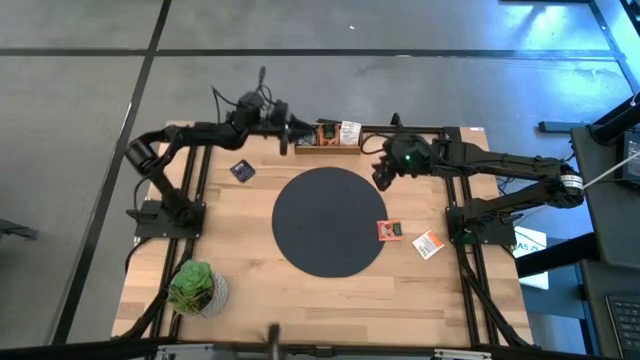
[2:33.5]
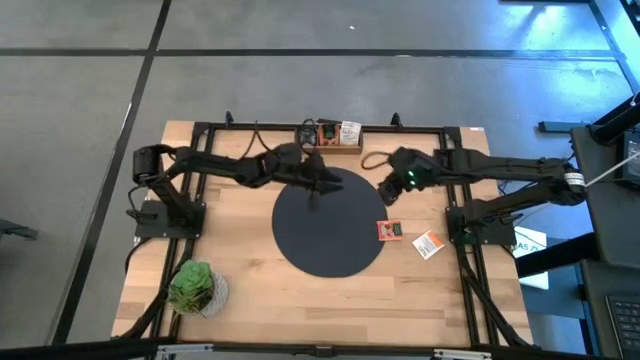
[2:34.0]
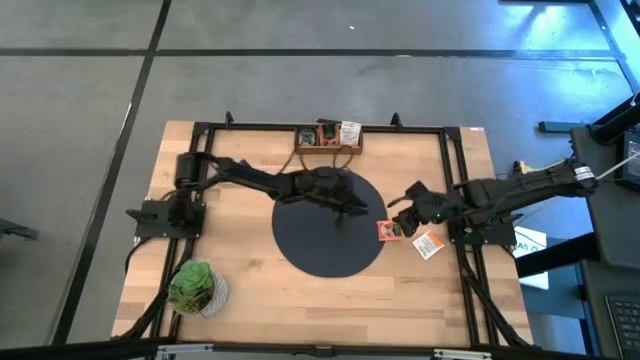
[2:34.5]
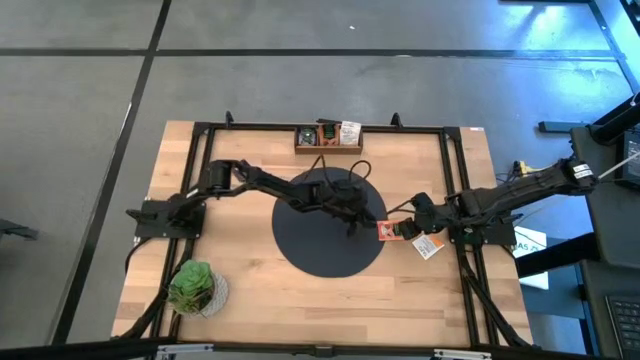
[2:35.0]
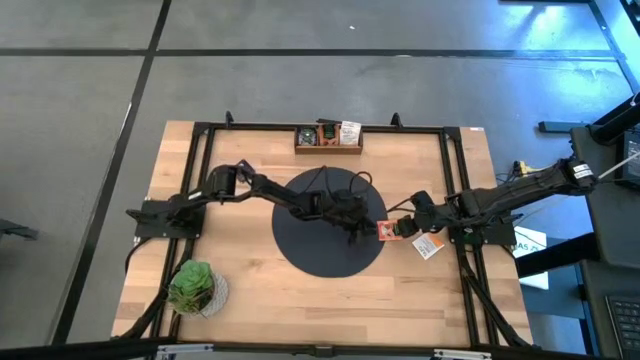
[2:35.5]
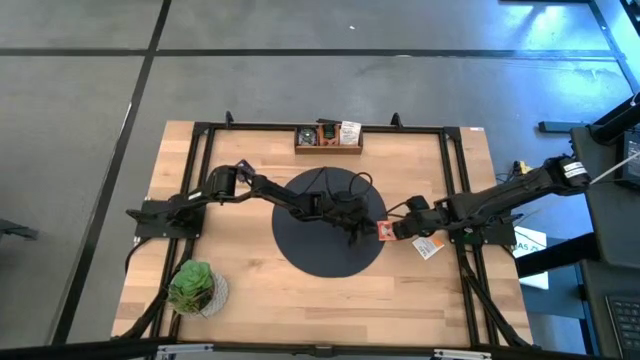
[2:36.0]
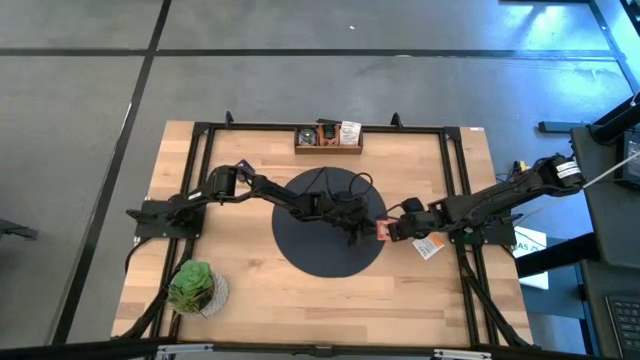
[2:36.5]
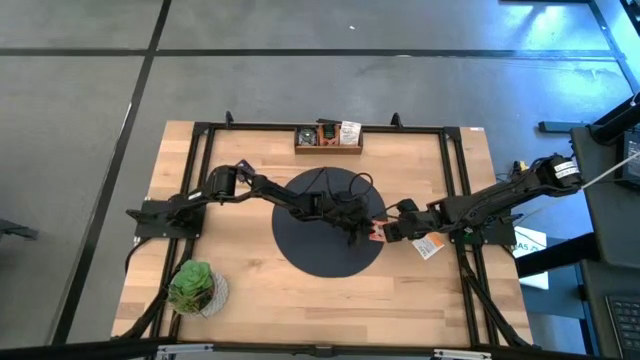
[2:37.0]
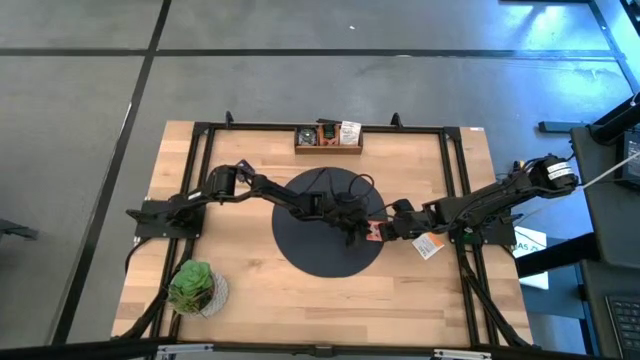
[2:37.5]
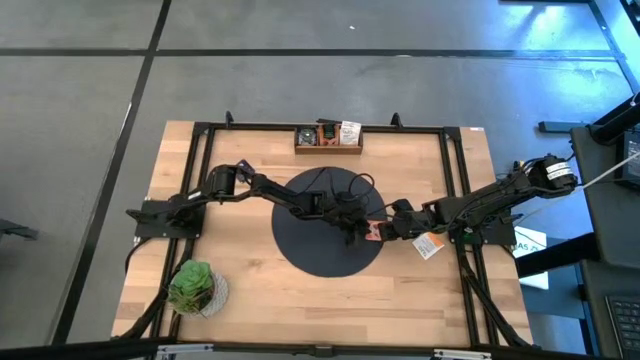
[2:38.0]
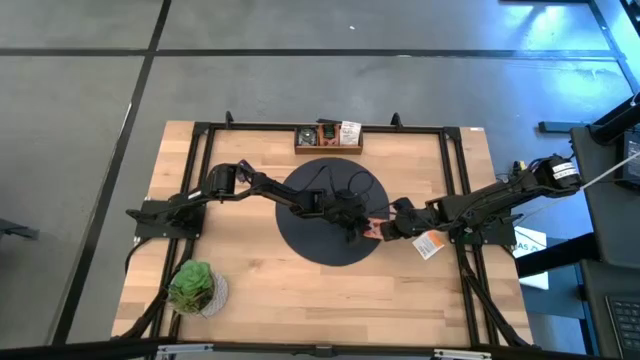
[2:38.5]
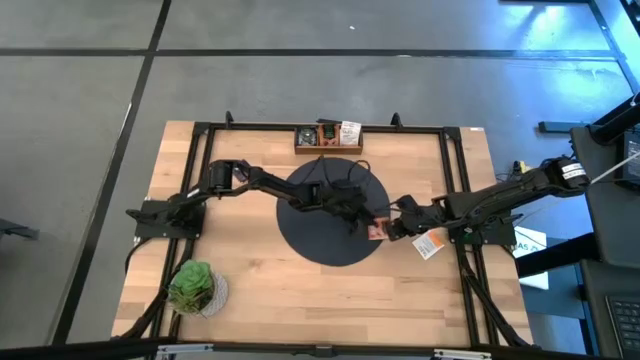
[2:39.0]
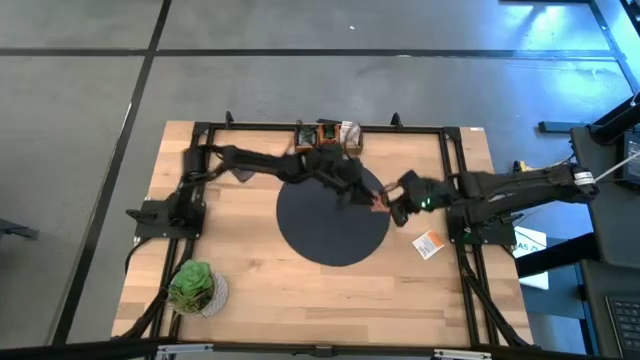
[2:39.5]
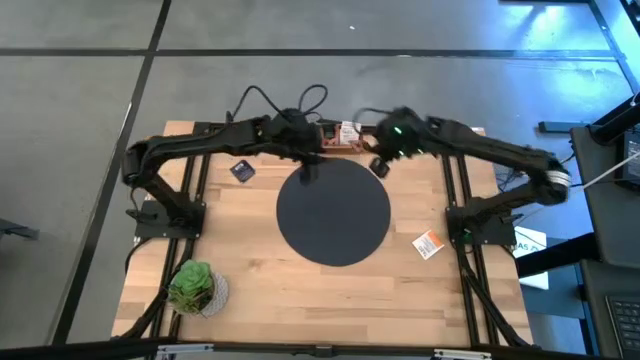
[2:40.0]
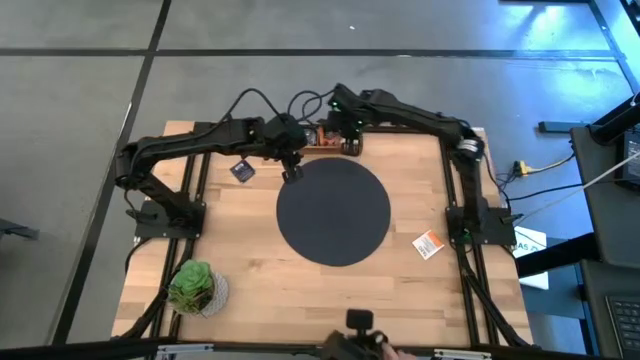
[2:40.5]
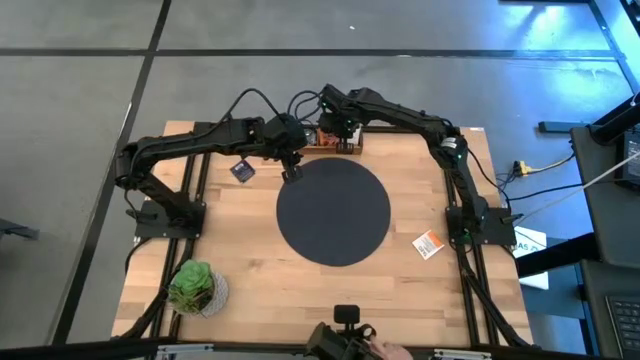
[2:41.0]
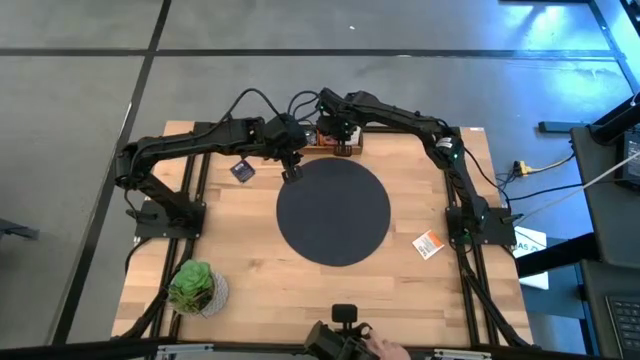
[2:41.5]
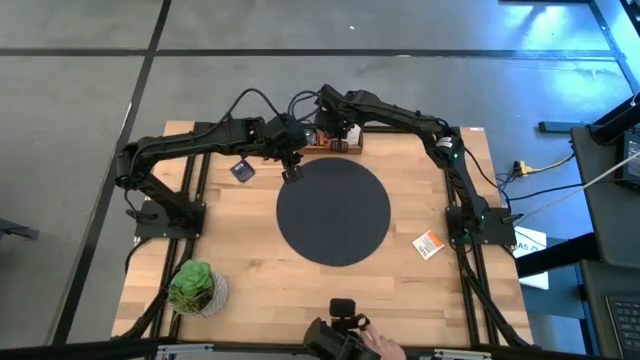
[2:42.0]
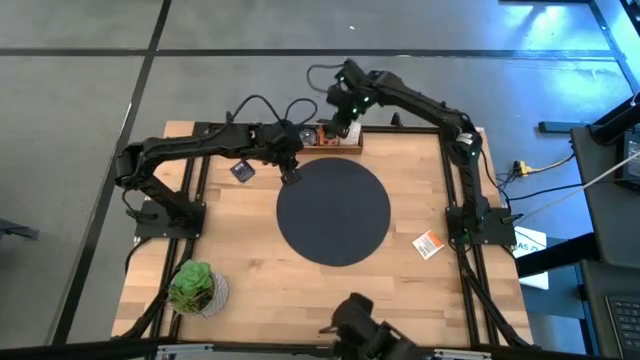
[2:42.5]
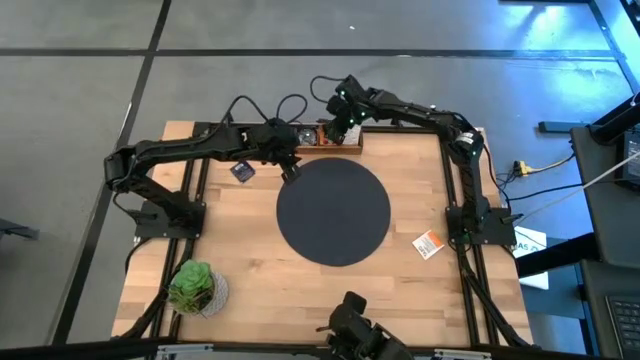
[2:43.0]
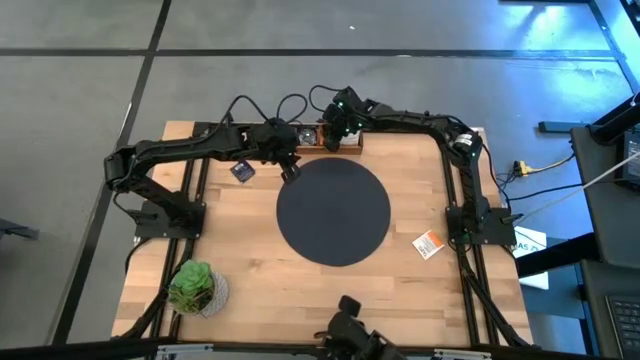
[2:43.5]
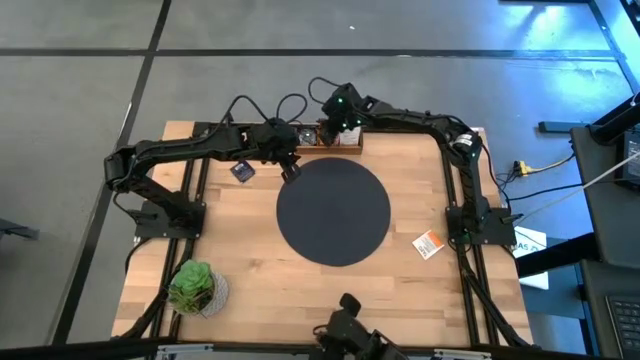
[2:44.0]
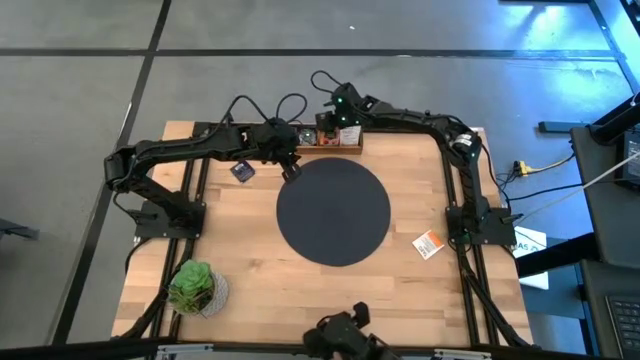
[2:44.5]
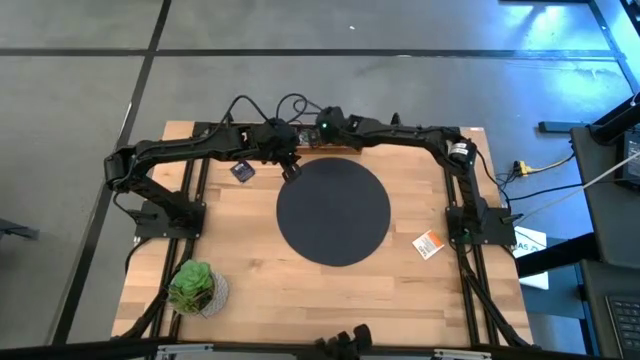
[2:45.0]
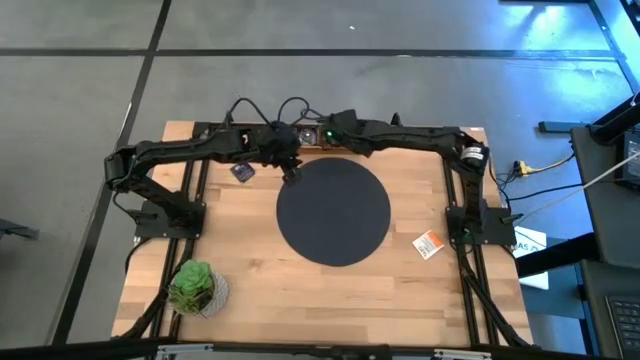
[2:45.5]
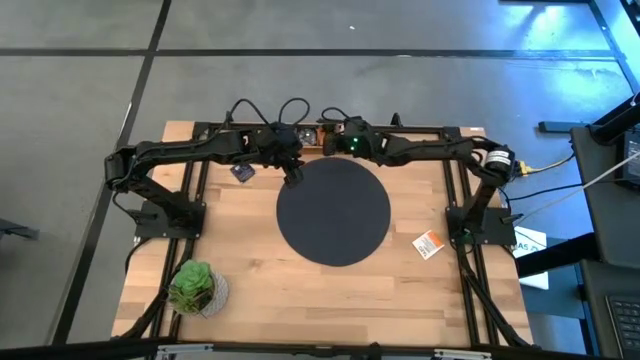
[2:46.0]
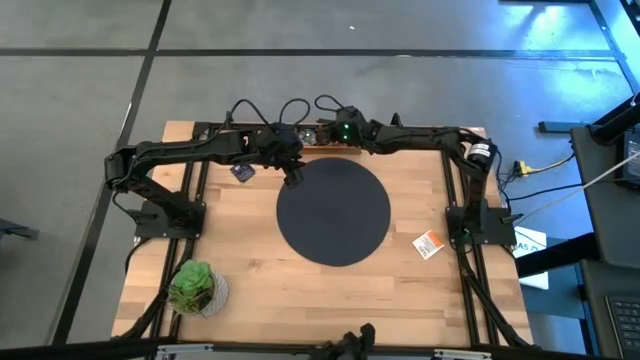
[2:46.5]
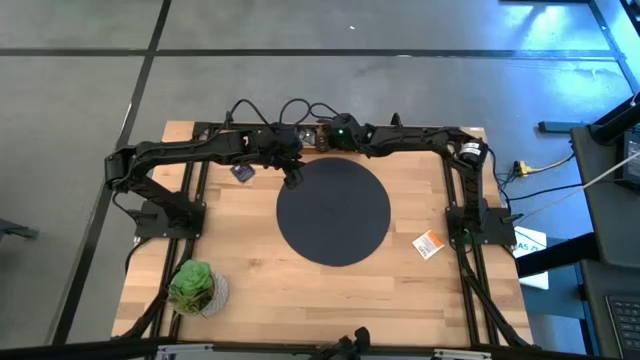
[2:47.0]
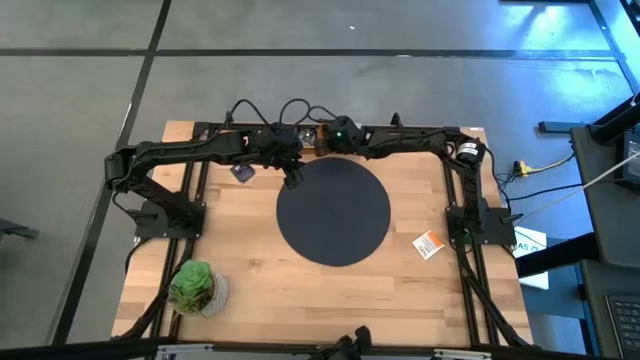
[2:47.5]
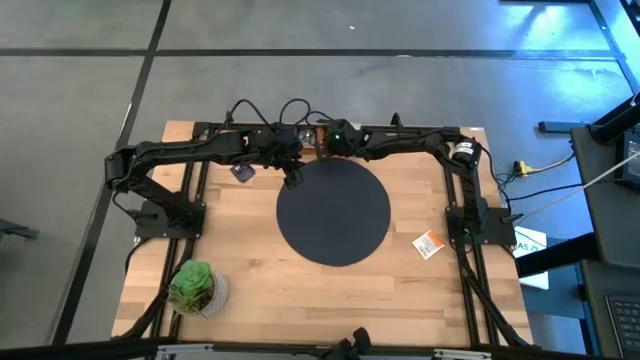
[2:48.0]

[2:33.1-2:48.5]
Task: Pick & Place Tea
Put the orange tea bag into the middle section of the wooden organizer

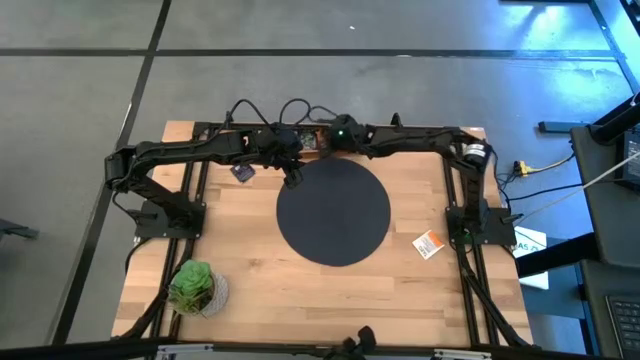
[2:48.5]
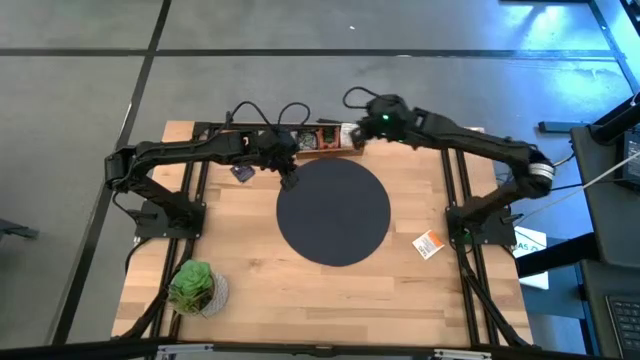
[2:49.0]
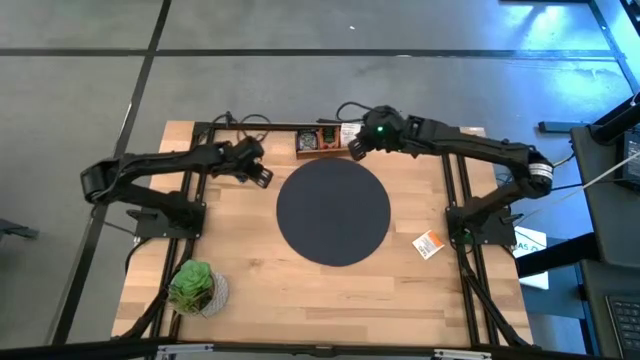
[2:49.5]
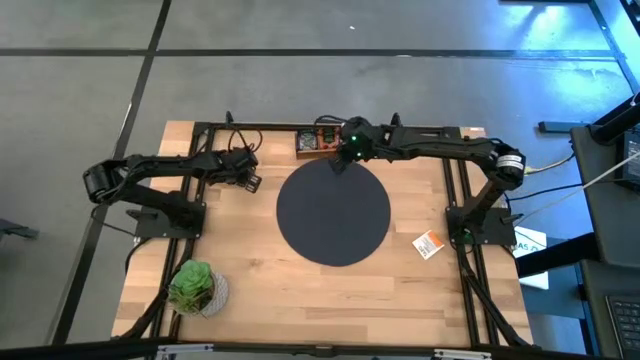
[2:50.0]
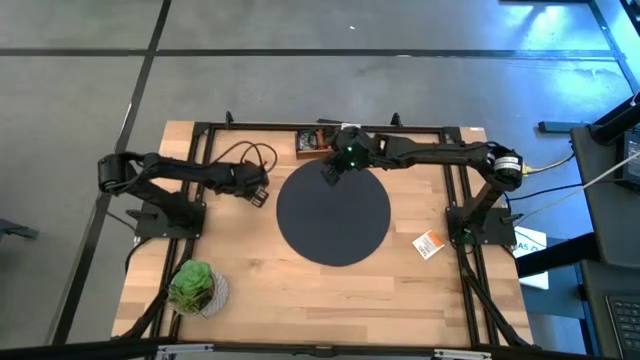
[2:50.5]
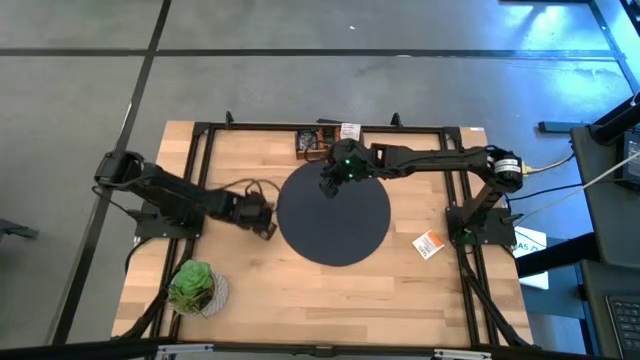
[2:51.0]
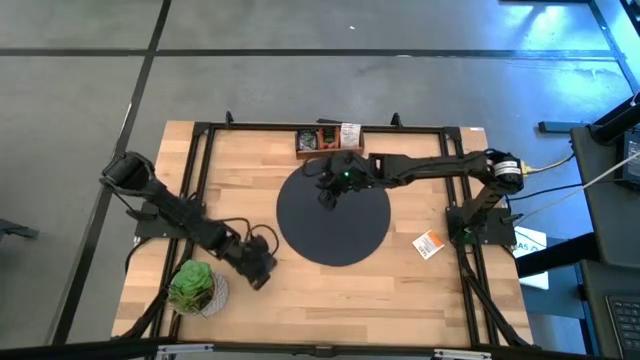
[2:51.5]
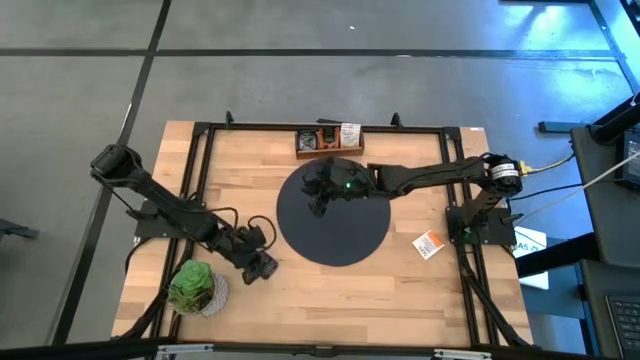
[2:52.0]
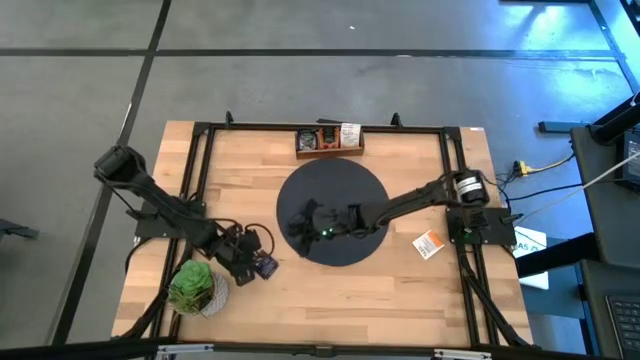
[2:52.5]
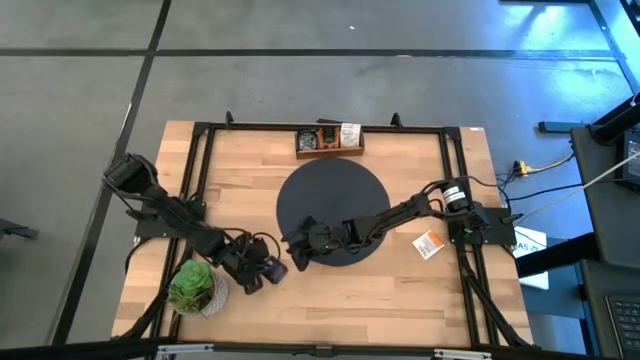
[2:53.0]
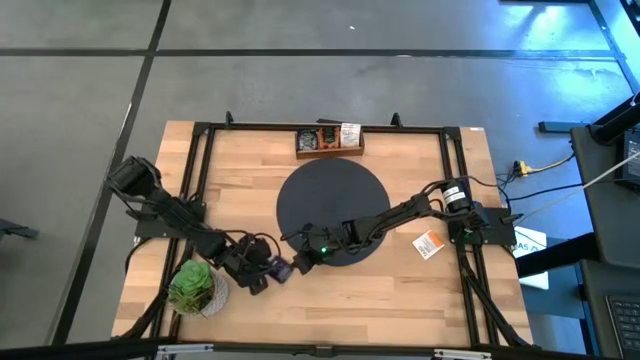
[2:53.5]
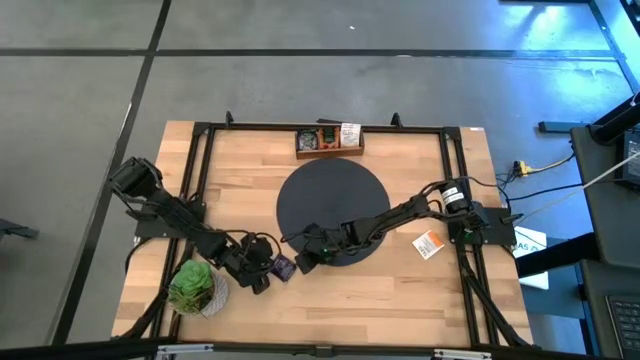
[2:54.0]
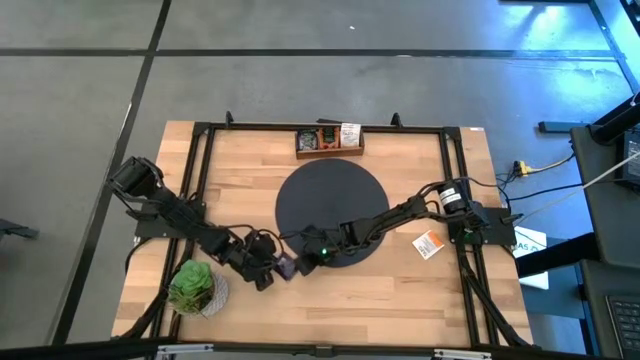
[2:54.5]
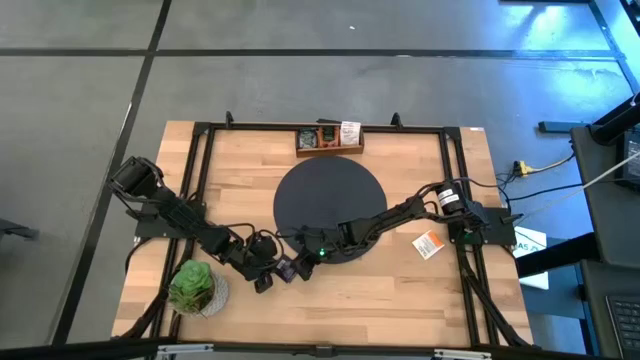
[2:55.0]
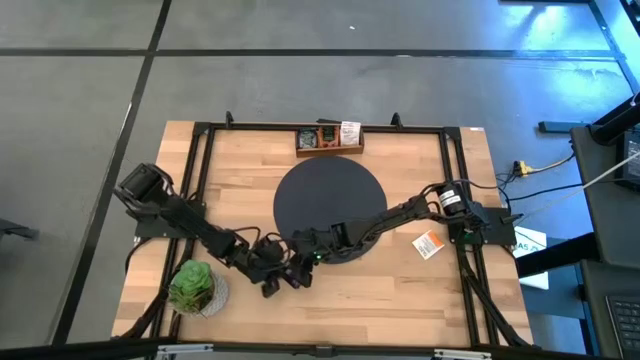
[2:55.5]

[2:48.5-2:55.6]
Put the purple tea bag into the left section of the wooden organizer
